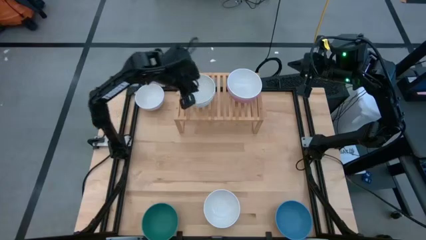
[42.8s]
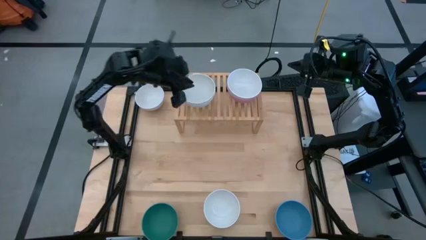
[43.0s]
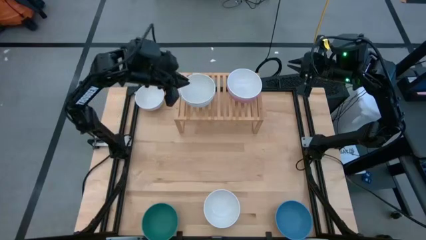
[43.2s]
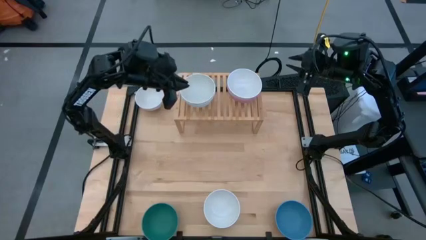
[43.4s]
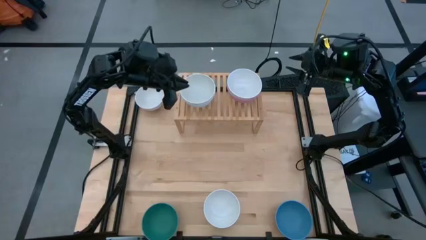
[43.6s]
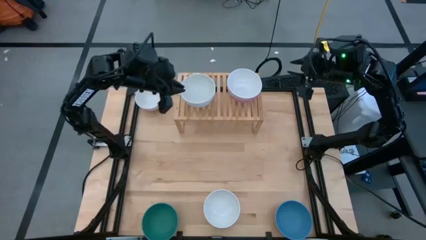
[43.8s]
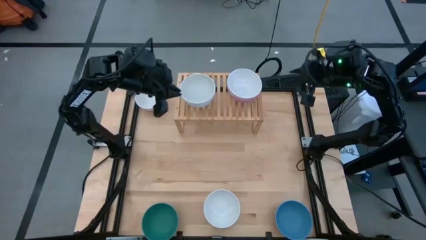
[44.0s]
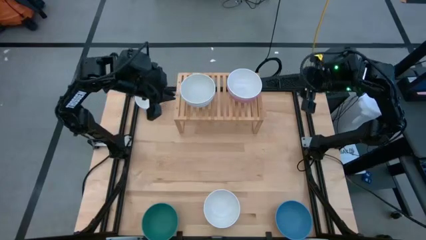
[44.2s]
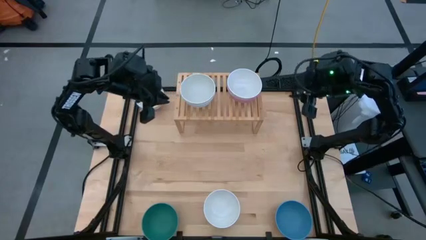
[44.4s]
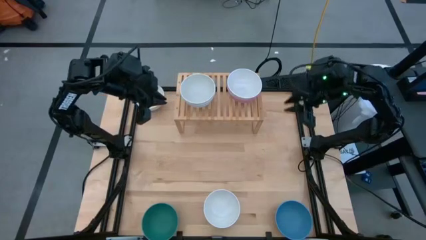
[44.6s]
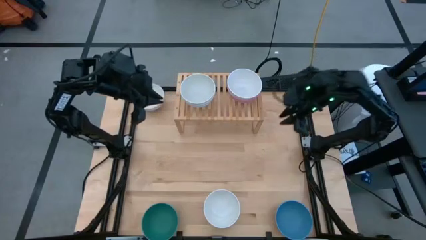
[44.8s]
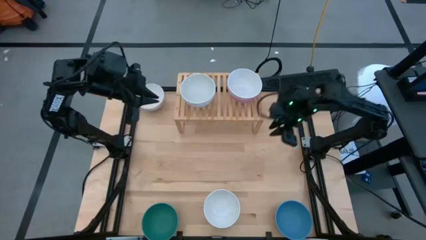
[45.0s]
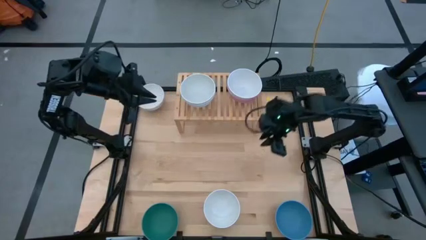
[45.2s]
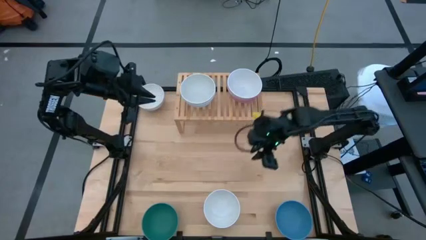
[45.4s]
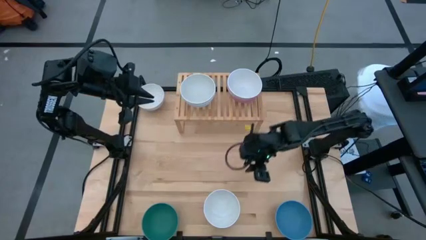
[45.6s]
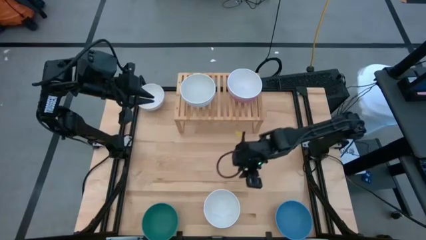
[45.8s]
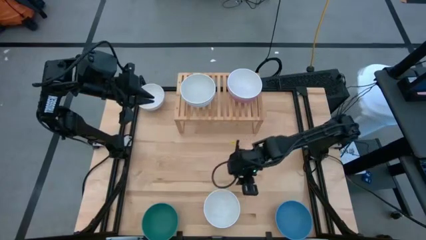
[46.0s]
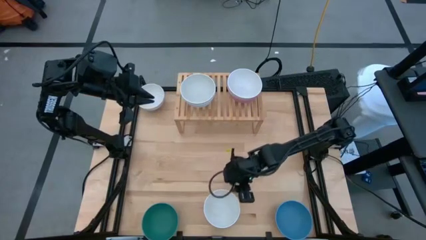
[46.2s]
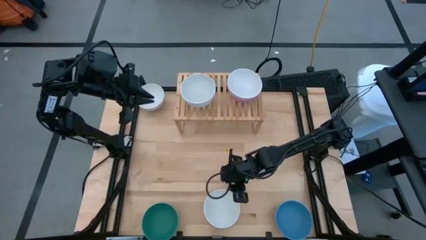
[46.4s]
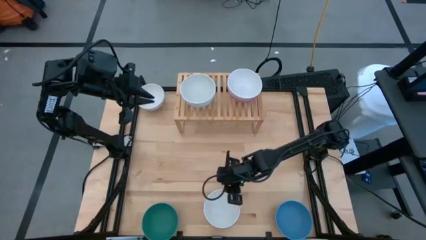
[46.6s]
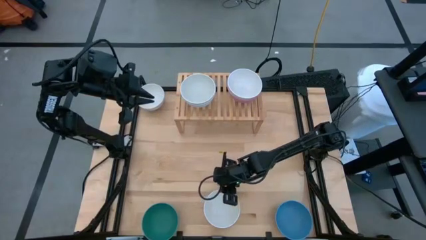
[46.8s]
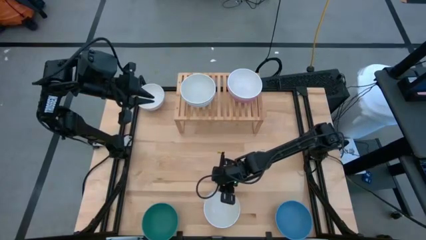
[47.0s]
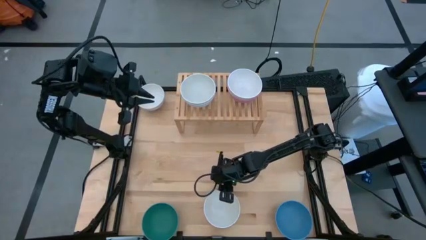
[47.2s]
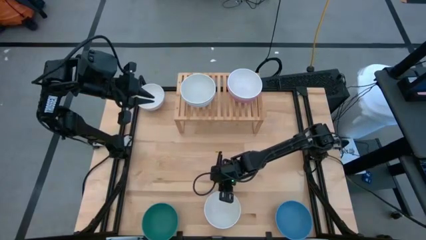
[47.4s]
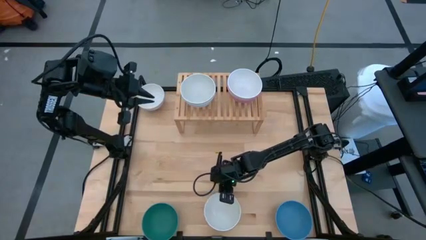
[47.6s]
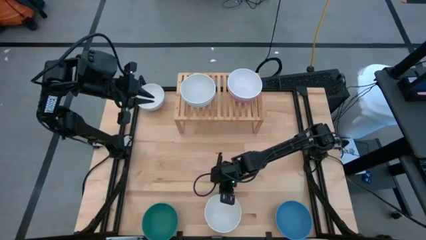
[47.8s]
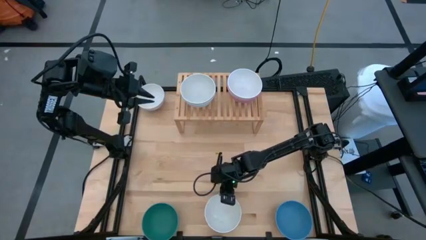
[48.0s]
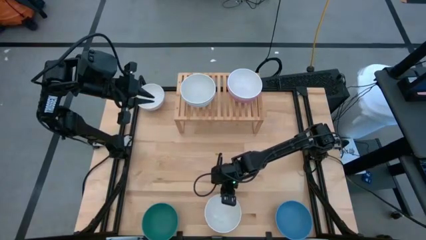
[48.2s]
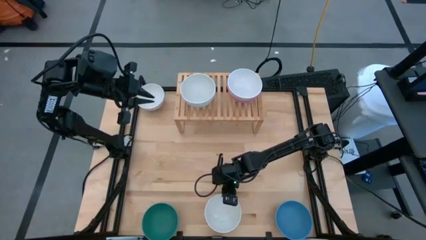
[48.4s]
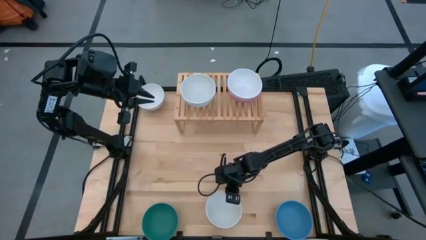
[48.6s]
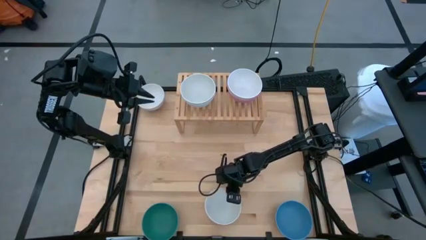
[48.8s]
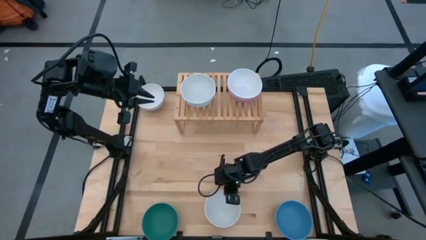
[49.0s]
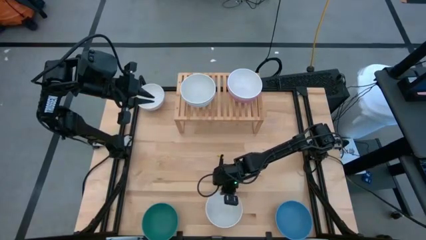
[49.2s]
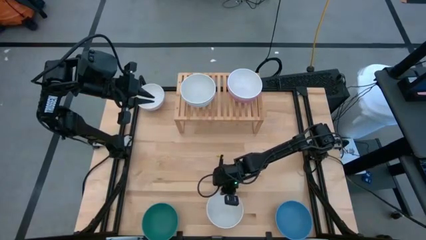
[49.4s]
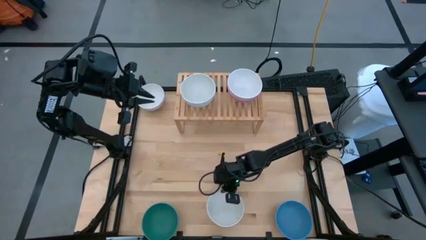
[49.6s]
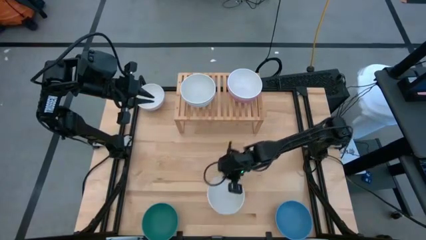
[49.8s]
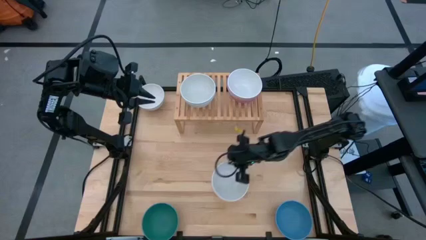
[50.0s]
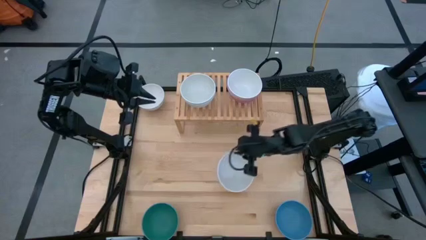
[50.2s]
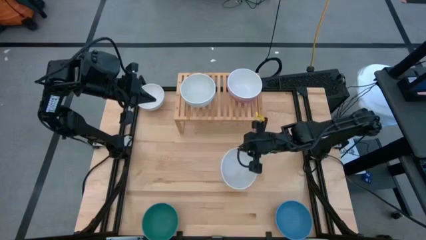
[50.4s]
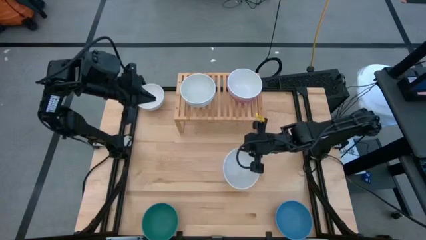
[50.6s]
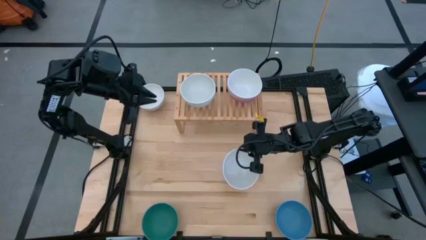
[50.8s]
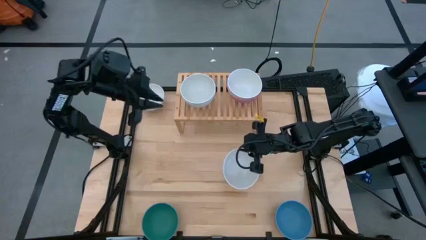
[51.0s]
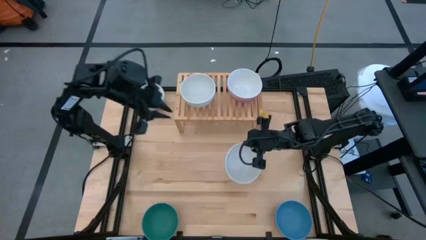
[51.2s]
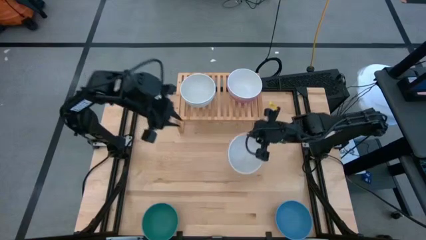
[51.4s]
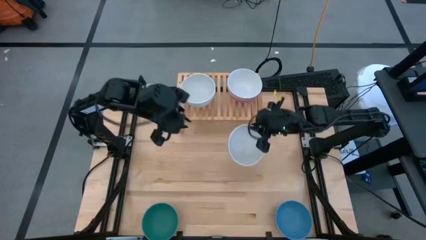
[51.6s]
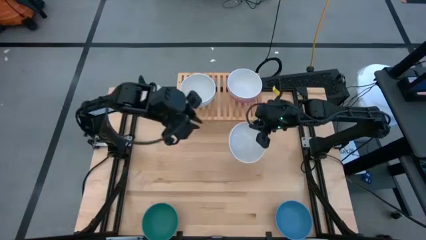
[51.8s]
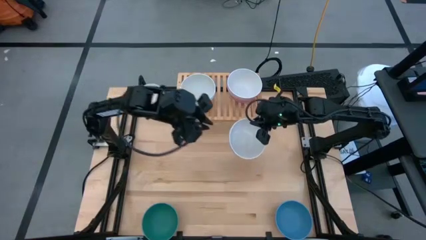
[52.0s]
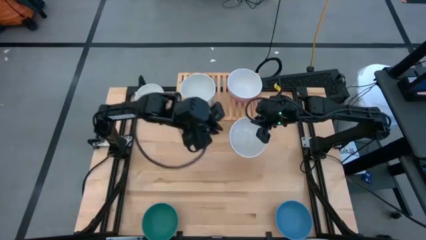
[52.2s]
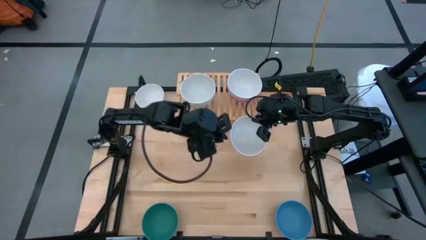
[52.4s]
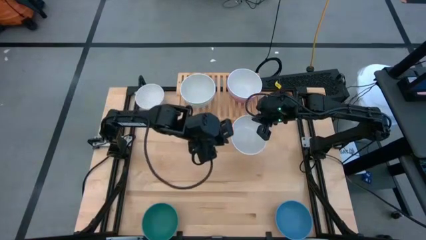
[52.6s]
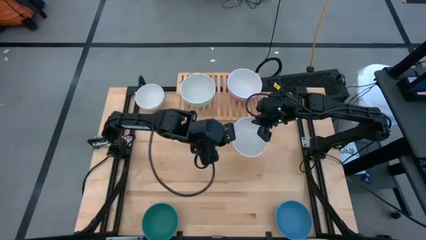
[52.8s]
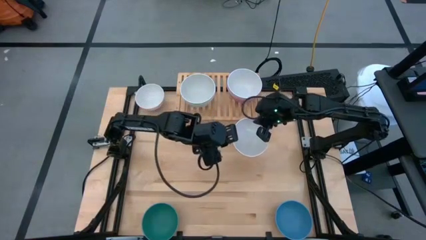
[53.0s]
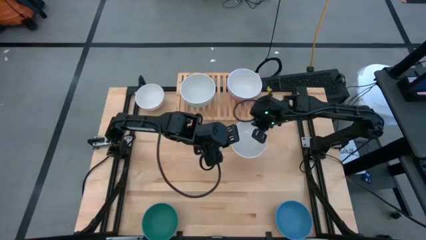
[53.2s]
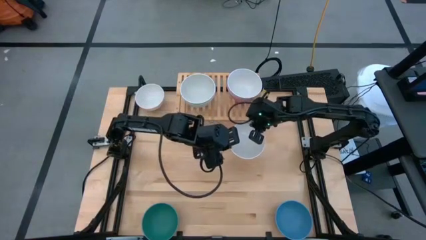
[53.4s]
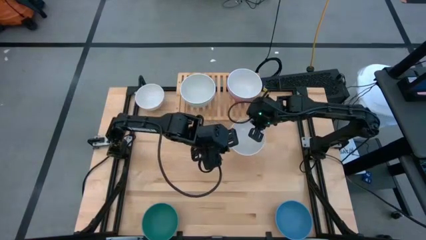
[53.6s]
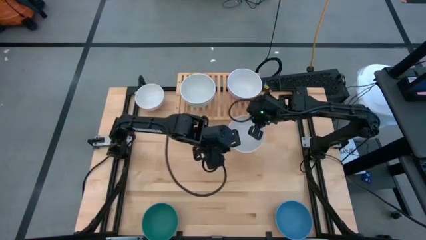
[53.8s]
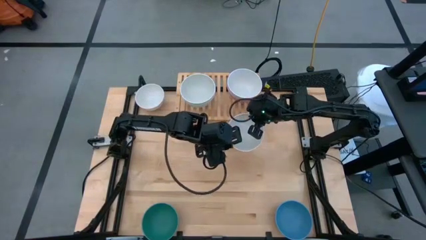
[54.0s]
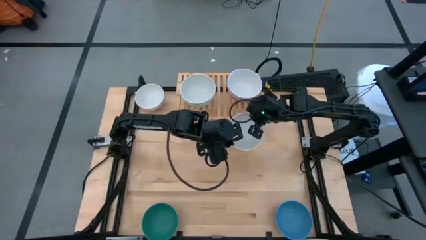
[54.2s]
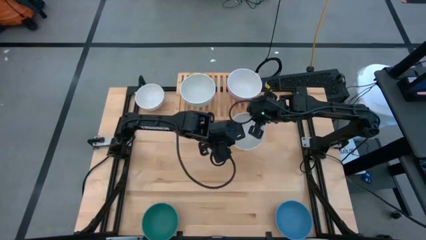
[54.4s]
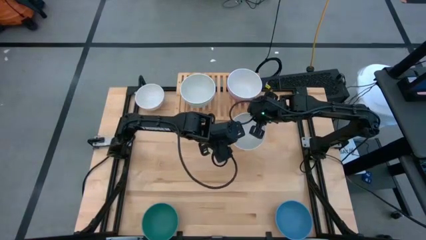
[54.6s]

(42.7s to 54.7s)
Task: Place and stack bowls onto a shelf
Stack the white bowl on top of the gray bowl on the shelf

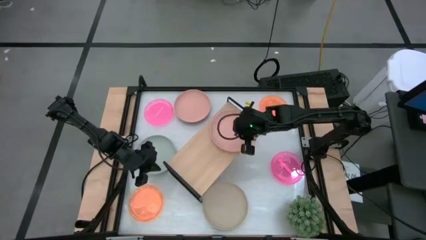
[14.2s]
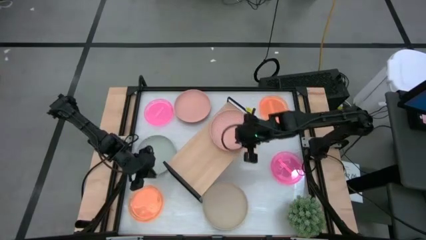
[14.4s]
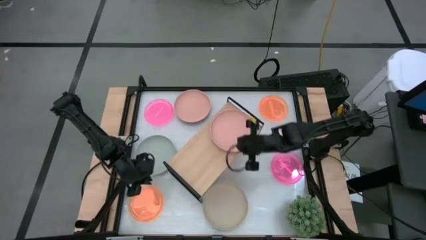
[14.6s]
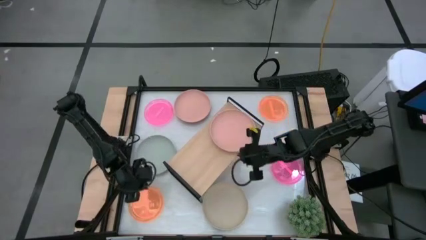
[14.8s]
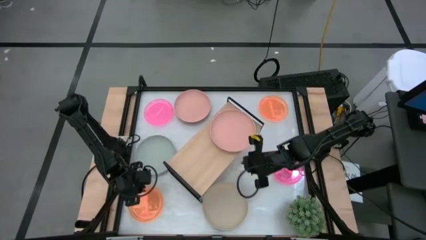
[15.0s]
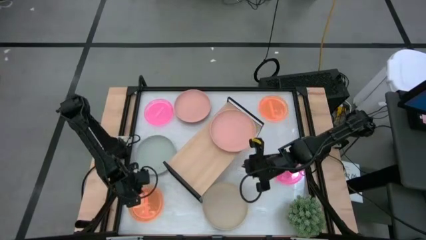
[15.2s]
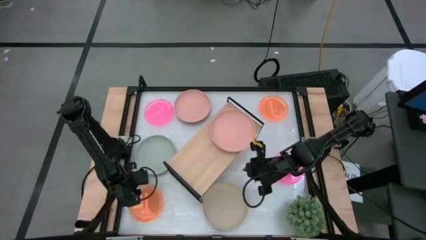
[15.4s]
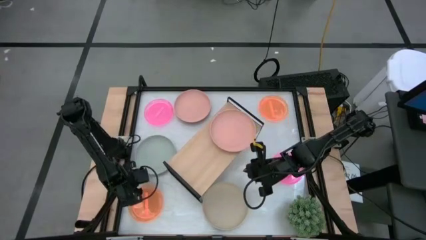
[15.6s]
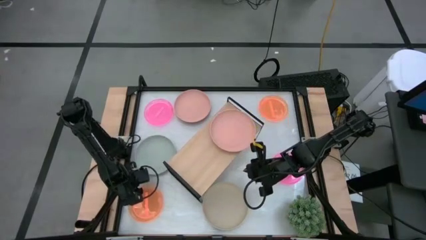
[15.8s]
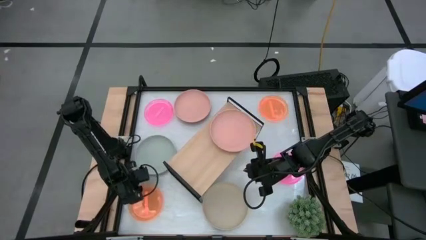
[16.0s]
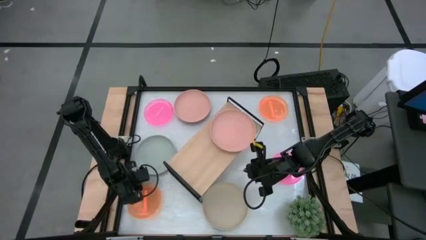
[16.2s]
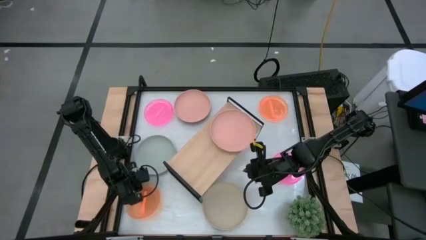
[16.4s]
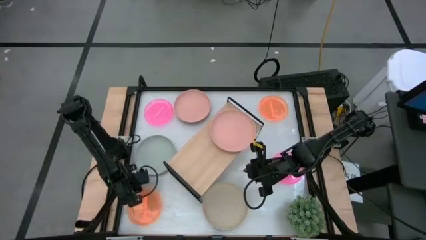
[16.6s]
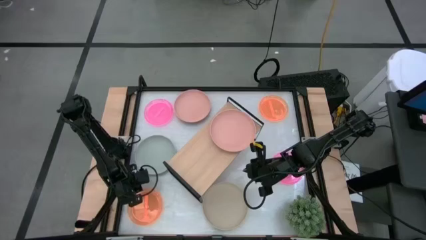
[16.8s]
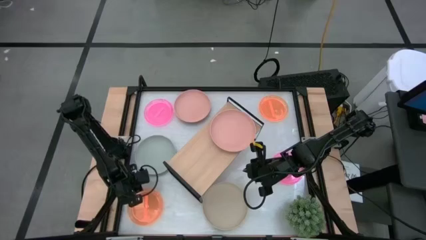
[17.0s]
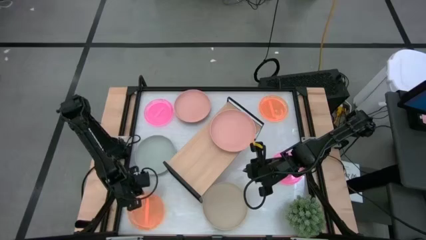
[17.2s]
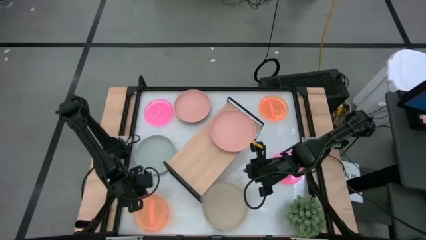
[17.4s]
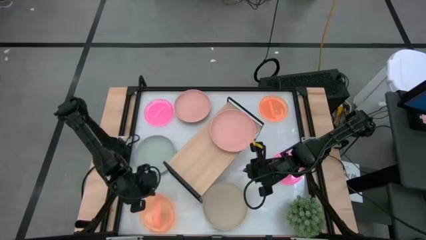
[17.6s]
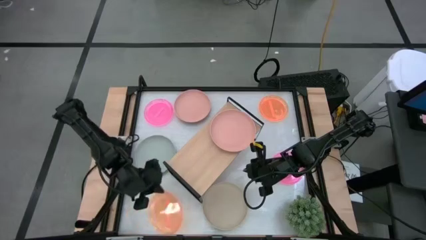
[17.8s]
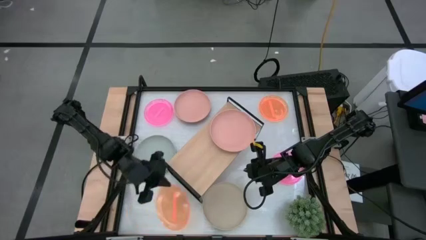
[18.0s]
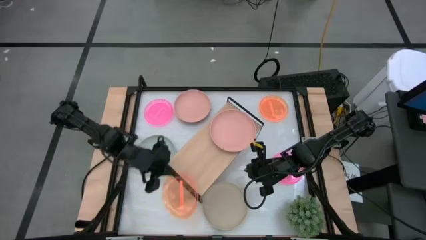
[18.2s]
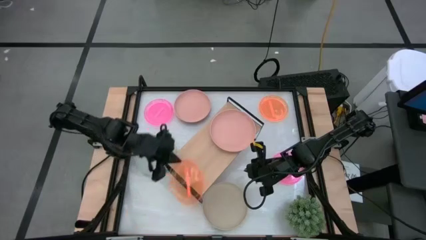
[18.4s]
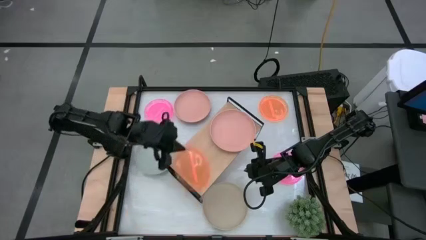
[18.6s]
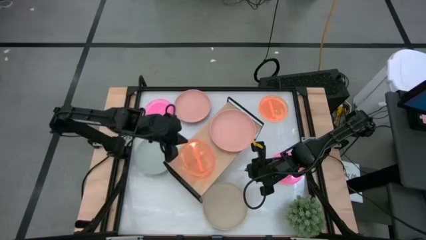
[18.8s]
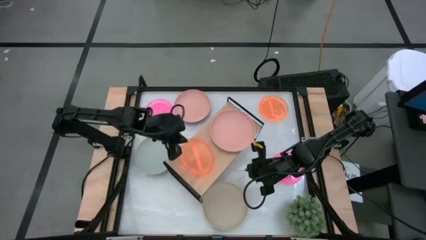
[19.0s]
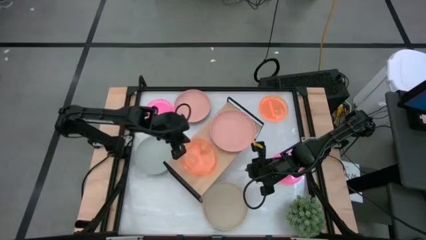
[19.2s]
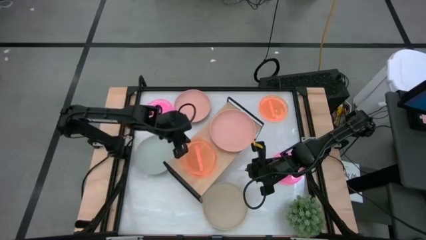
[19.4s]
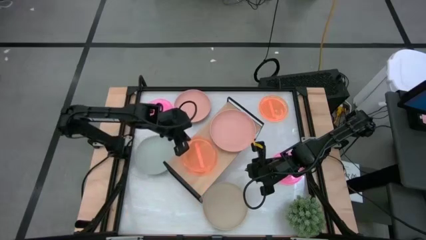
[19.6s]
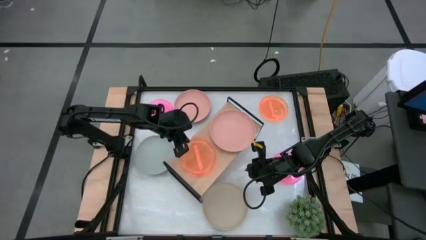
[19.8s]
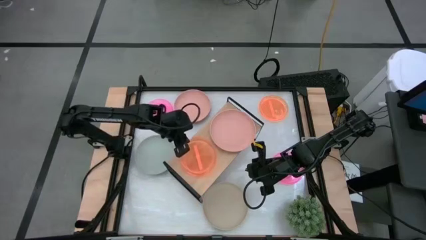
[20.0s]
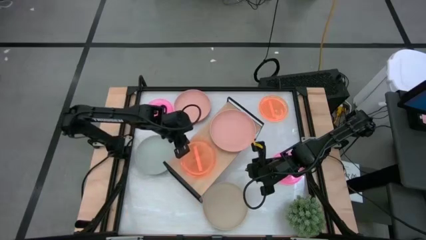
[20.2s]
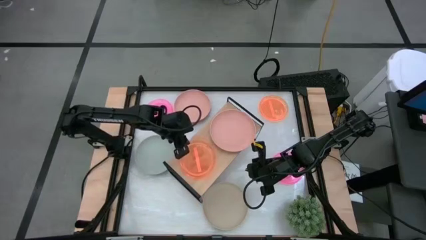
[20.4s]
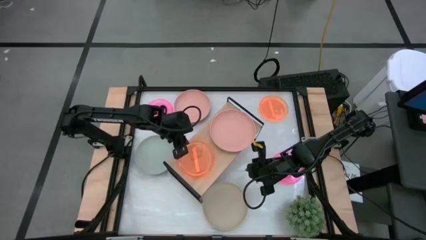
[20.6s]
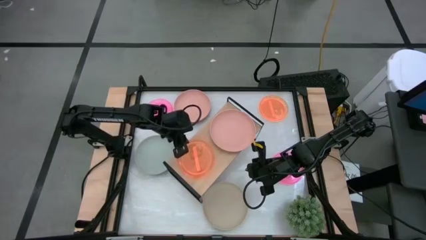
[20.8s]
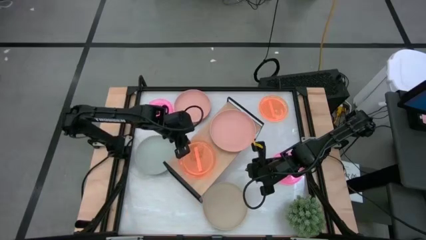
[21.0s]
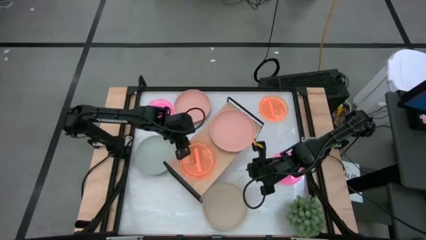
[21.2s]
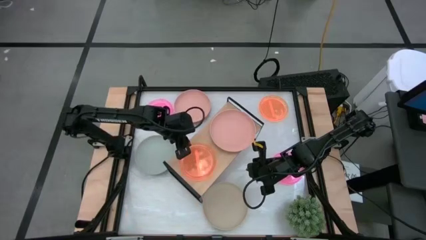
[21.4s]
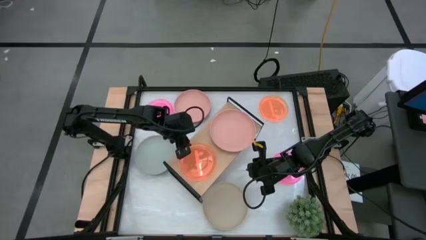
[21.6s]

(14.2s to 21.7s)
Task: Place and stack plates onto a shelf
Put bottom small orange plate on the shelf
